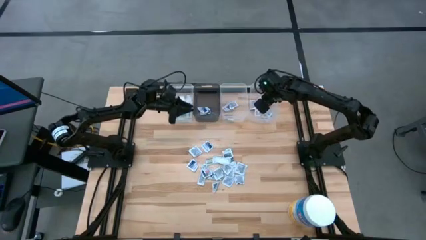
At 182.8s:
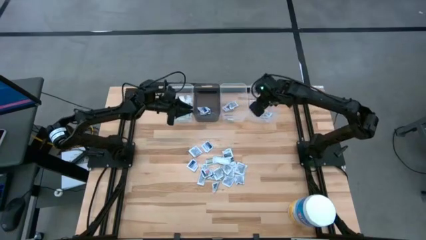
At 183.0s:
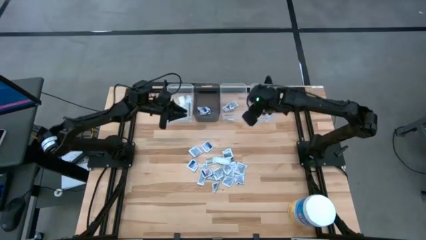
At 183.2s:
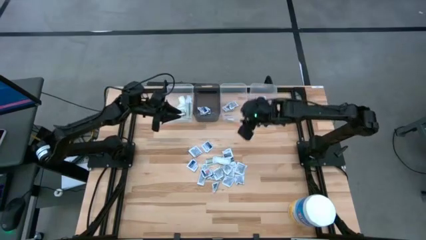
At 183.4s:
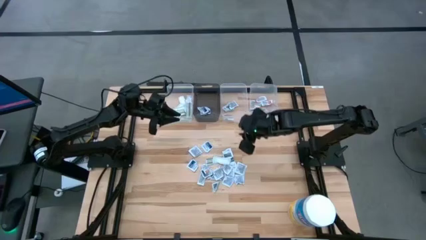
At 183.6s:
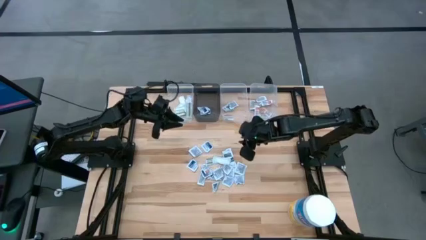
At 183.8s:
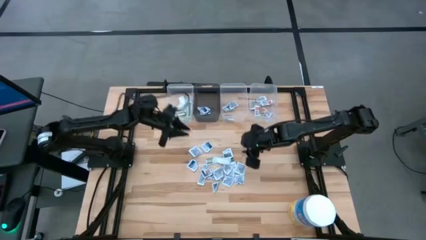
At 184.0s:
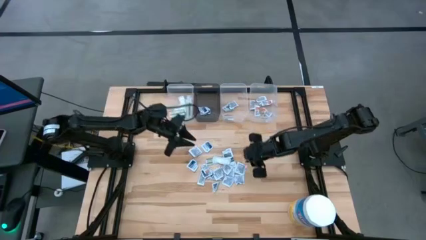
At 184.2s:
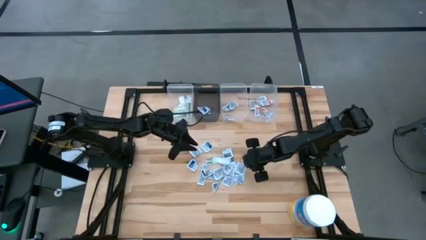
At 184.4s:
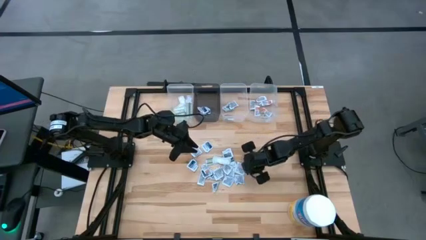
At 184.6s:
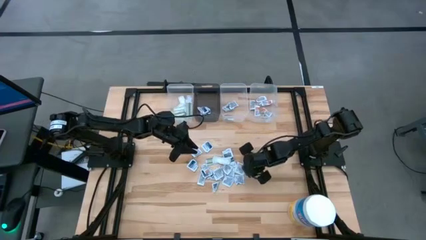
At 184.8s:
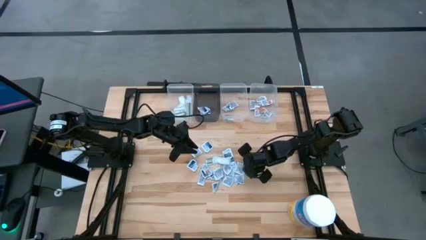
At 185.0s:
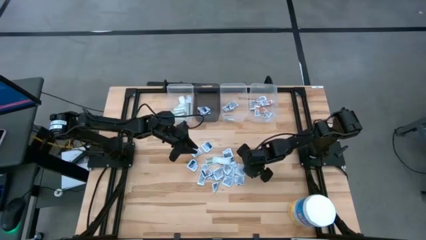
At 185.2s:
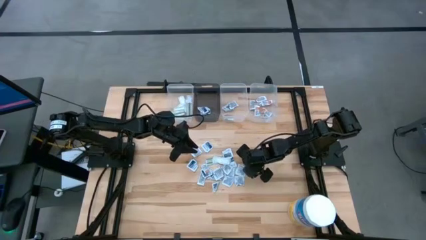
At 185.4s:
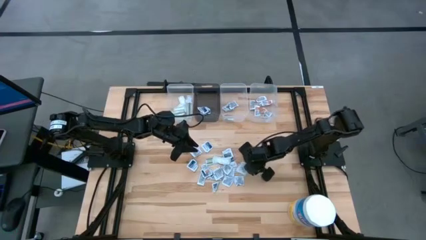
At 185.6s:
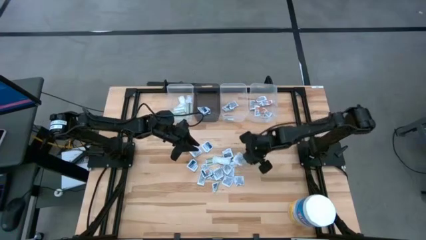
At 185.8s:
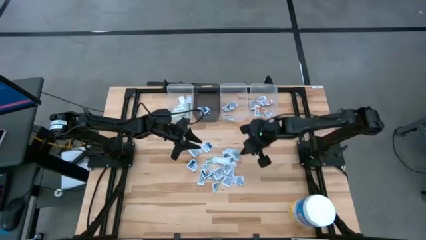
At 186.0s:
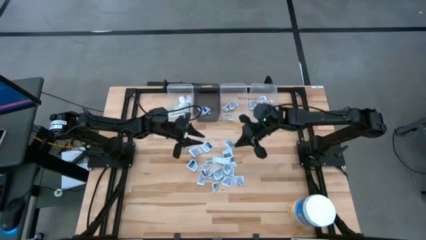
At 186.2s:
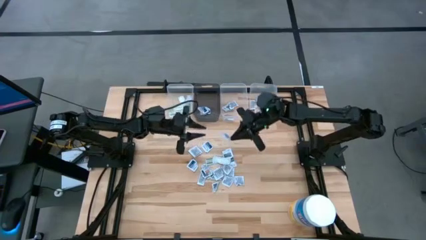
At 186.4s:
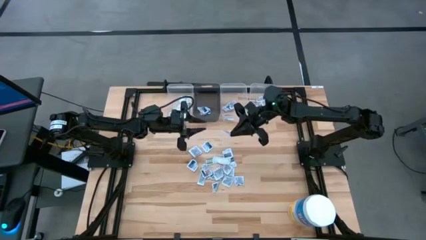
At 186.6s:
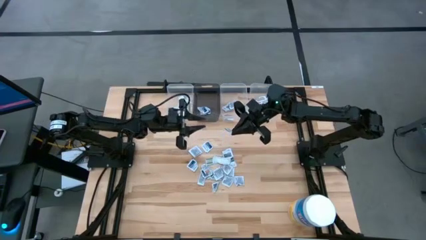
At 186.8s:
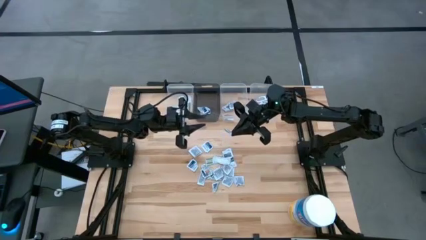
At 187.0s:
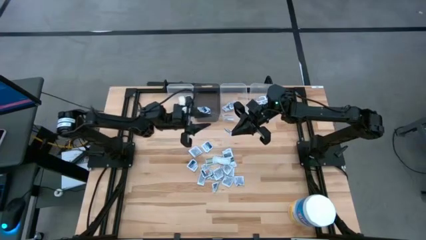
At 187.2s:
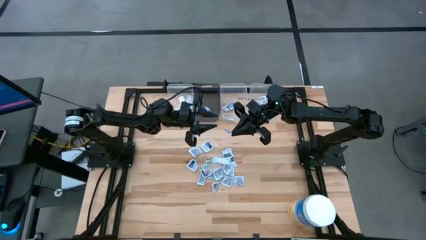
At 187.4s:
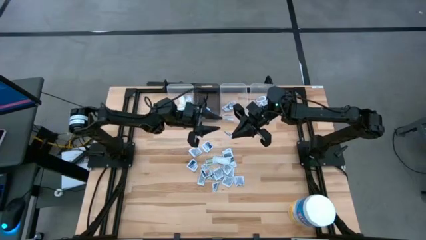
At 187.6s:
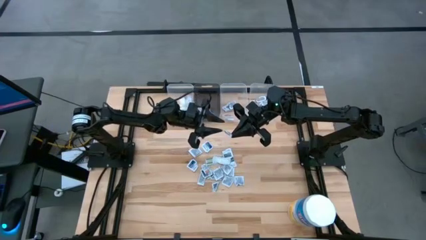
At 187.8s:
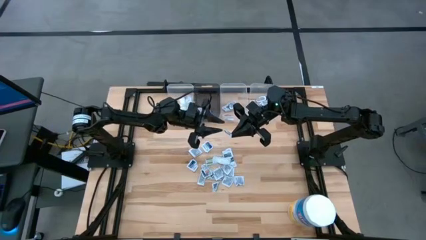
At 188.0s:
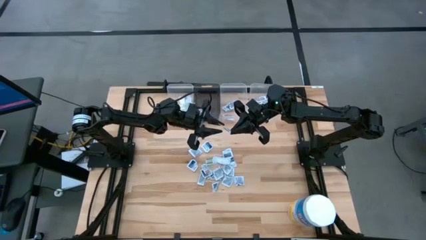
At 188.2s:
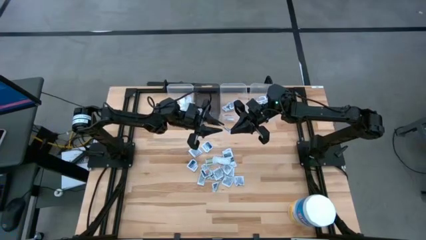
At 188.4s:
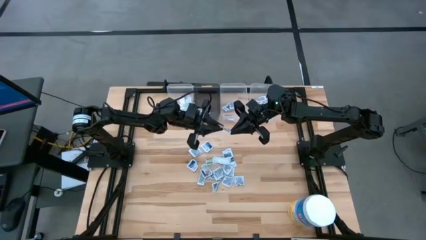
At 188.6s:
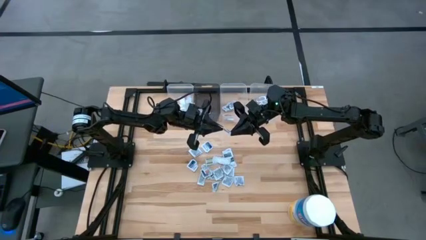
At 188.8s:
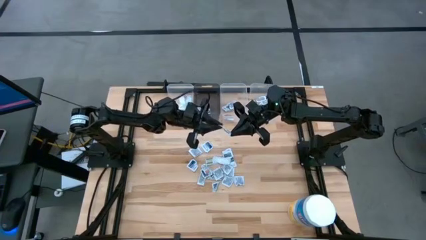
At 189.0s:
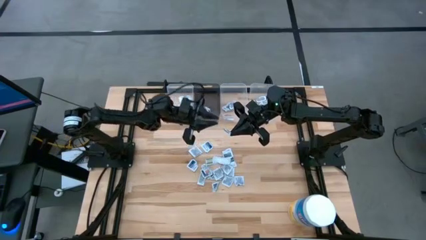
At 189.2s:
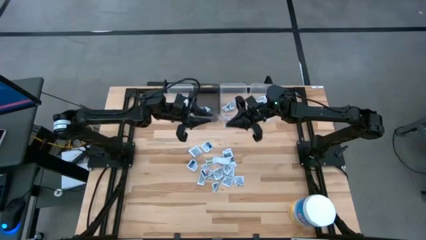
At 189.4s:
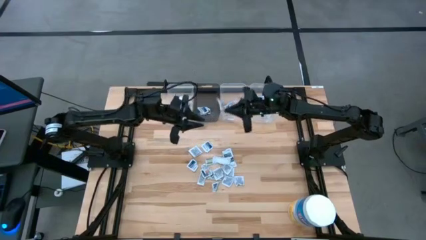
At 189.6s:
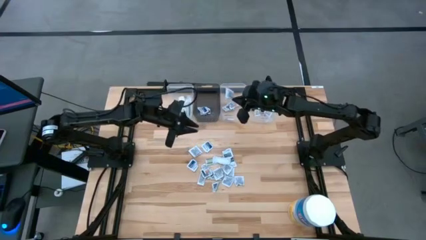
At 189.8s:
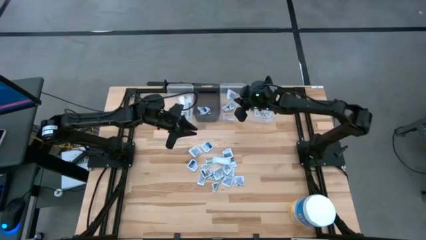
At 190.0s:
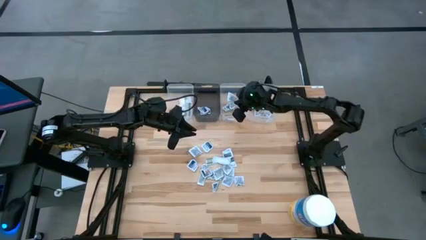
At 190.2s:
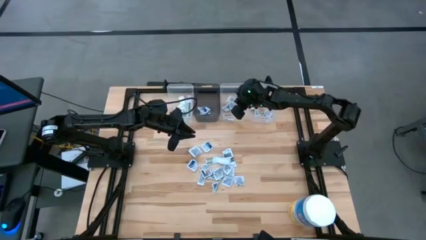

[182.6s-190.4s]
Task: Pick & Place First Aid Supplies
Put the towelette pack into the middle transparent bin

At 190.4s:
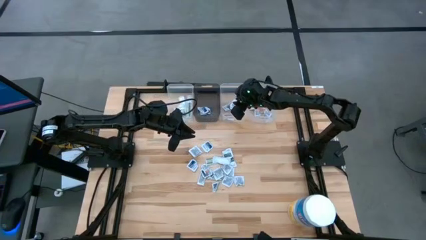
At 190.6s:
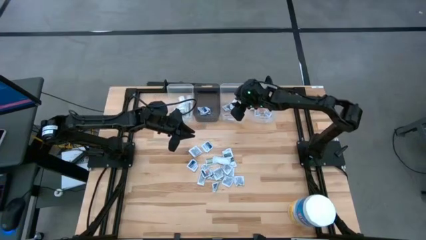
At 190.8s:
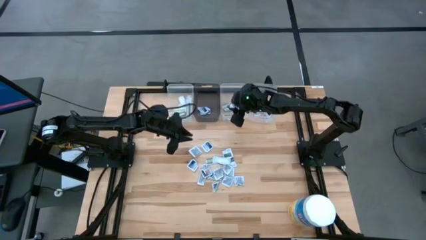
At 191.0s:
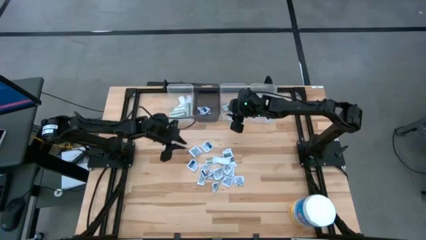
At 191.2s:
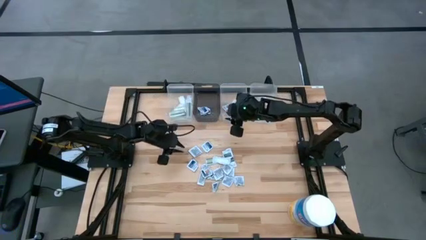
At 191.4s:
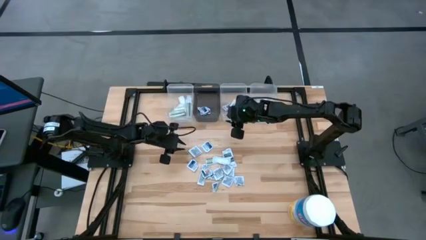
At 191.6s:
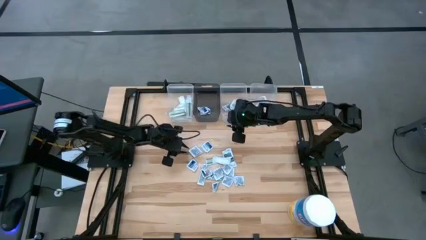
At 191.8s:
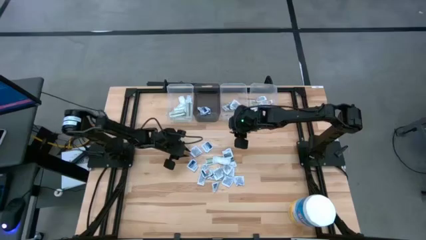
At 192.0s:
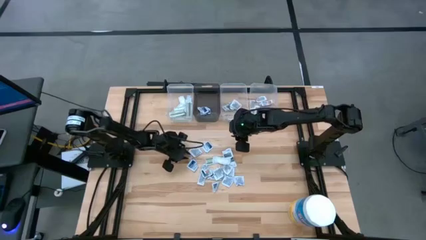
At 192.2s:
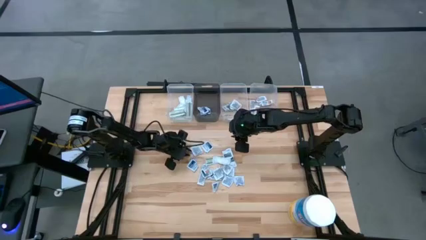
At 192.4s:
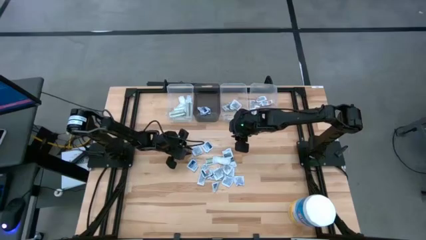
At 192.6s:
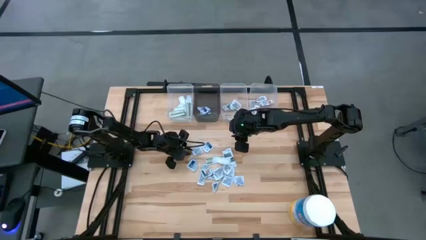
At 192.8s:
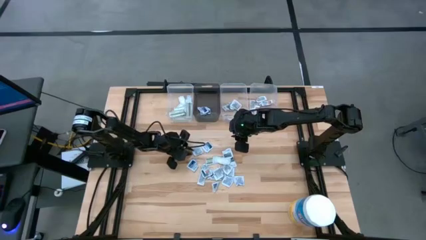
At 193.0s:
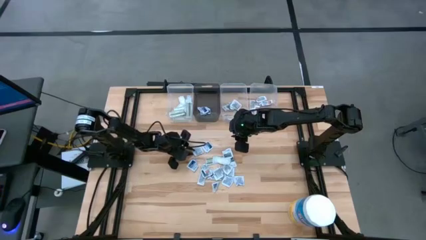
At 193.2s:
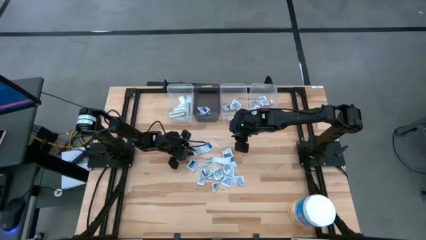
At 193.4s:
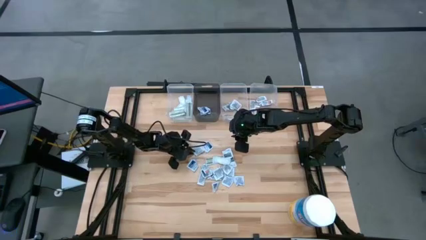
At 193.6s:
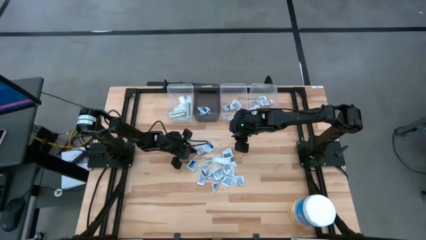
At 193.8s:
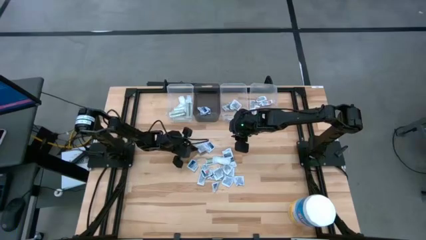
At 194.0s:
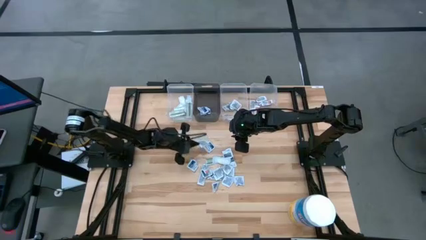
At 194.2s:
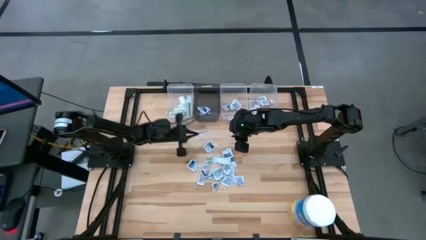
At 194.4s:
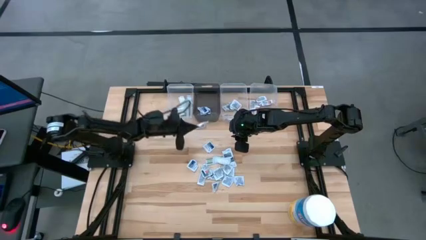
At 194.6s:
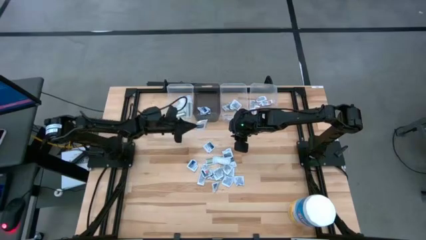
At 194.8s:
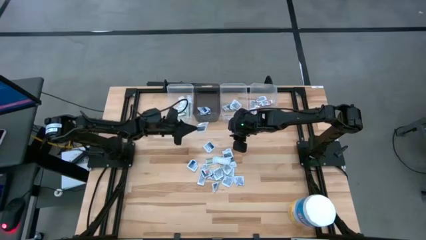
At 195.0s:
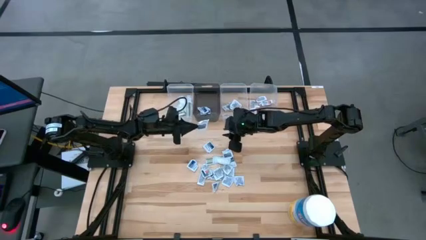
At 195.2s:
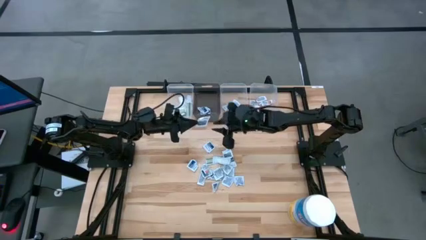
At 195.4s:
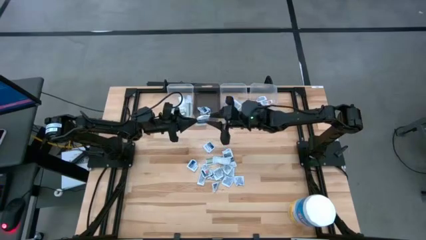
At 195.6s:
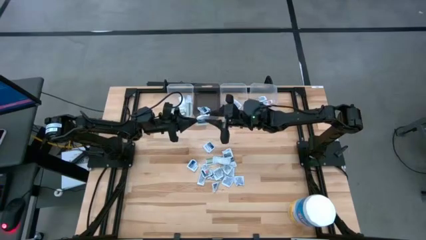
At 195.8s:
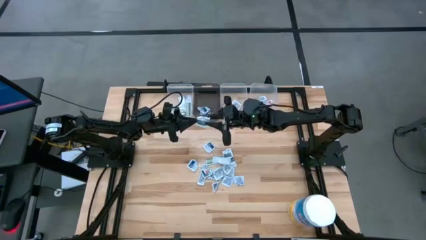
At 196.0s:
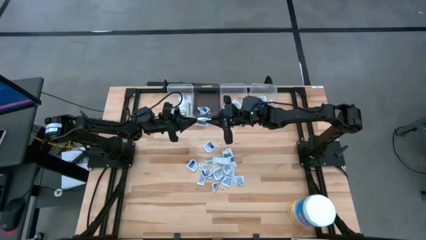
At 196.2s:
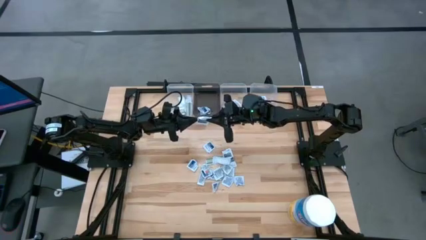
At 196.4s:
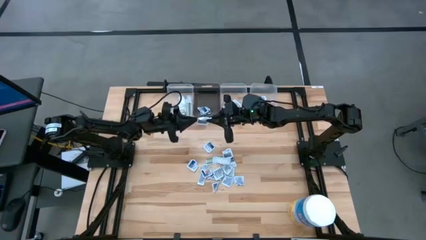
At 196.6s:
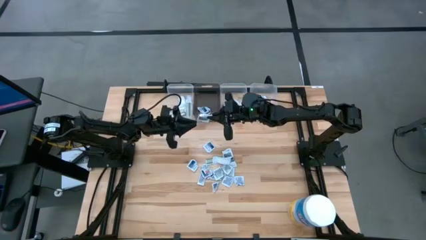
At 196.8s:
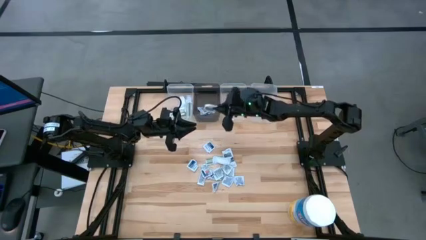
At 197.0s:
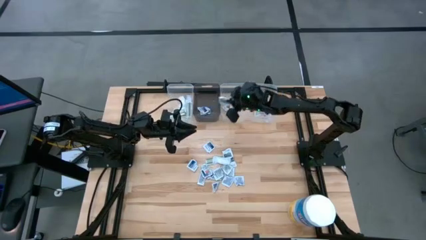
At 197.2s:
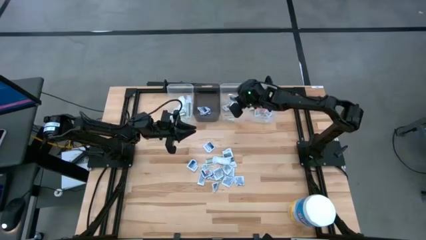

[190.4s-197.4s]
Put the towelette pack into the middle transparent bin

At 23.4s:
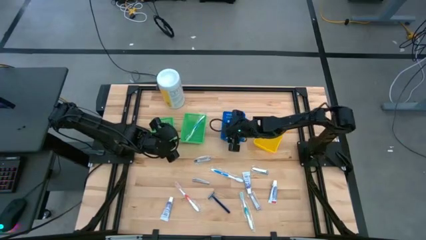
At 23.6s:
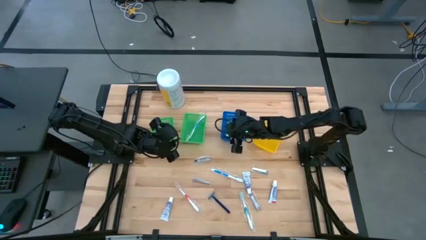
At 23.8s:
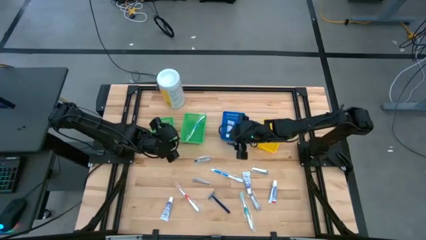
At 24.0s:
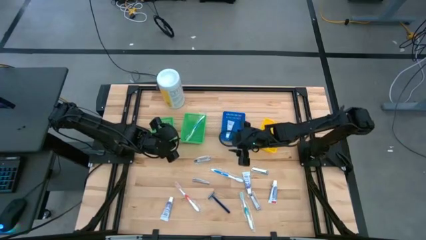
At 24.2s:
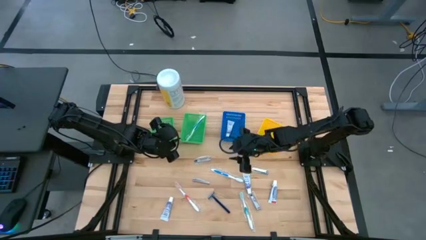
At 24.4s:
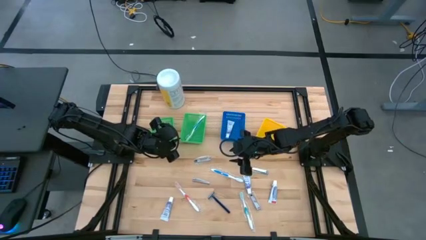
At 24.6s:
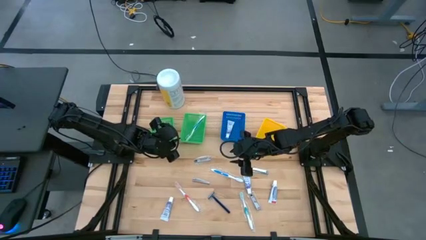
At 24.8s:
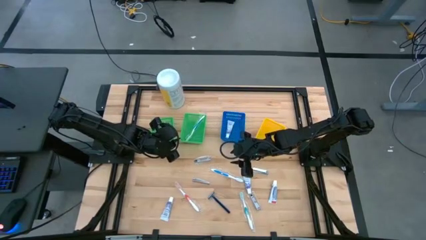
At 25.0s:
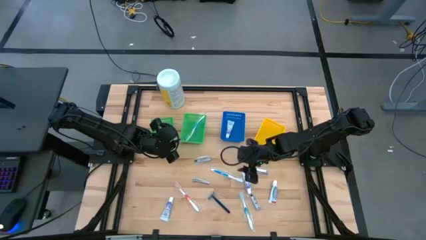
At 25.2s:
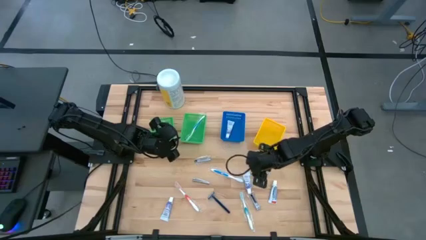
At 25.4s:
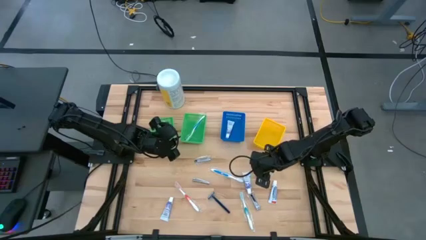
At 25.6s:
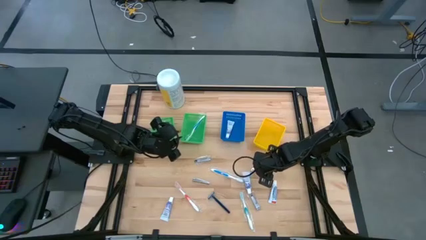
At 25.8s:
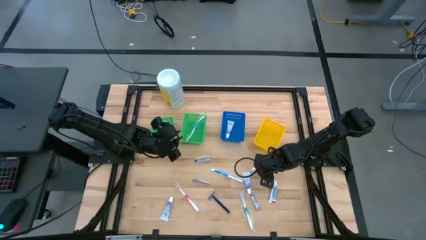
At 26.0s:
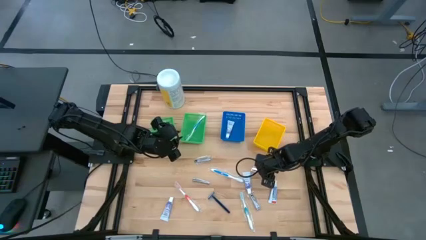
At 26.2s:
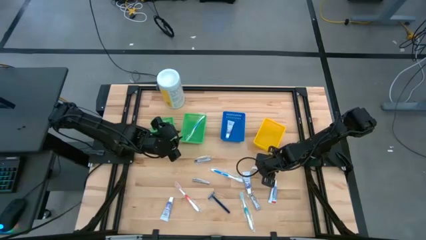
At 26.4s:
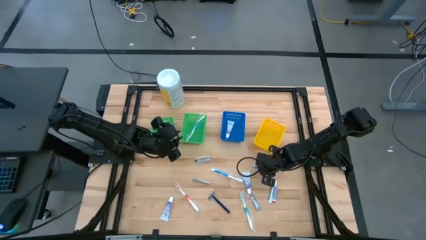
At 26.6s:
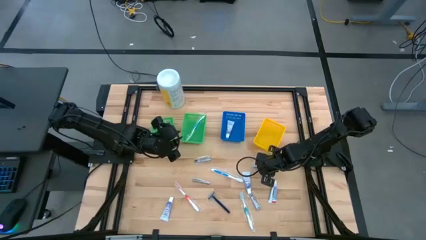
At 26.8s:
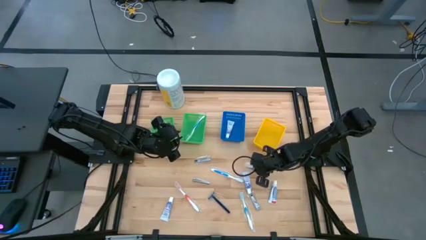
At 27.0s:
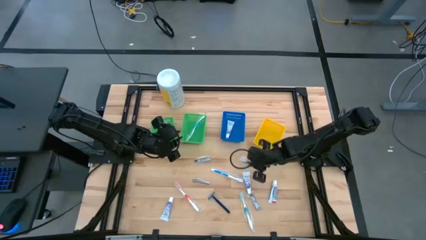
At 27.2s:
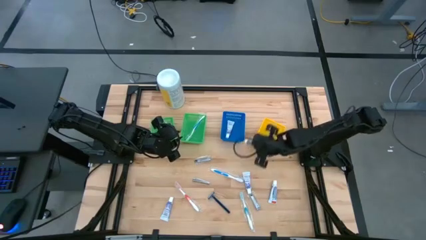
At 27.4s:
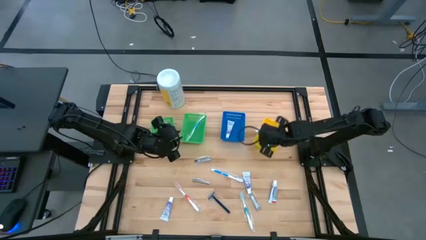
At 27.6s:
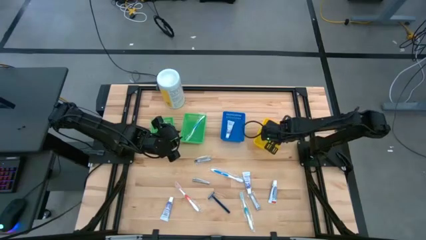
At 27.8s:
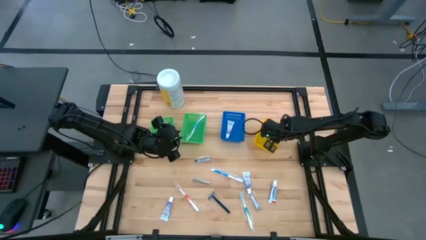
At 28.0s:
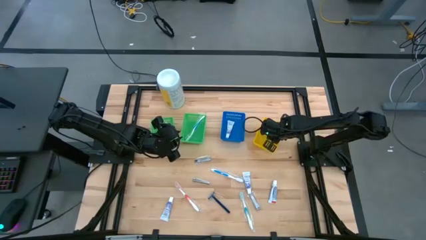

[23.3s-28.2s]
Task: Pick & Place Travel size toiletries
Put the silver nail cutter into the yellow bin
